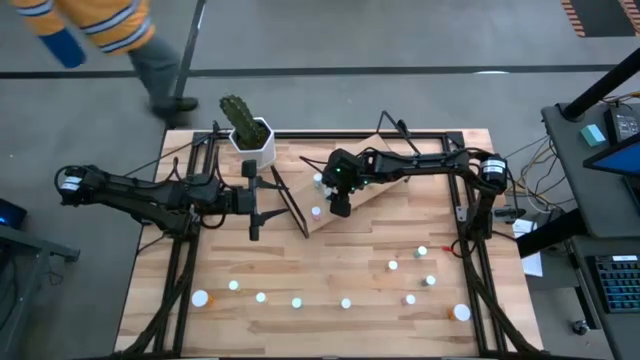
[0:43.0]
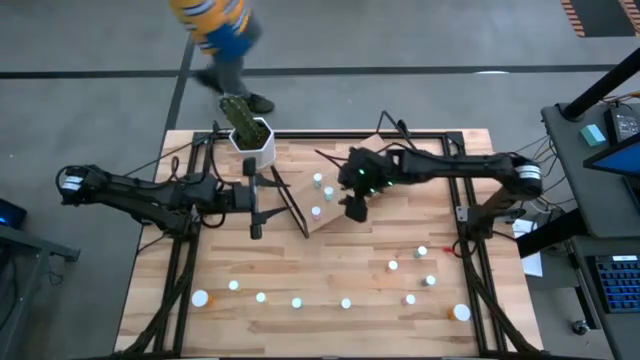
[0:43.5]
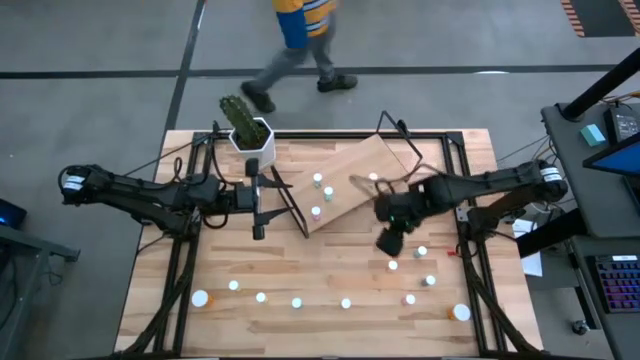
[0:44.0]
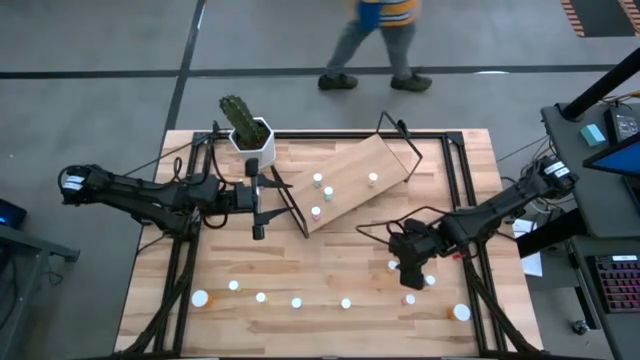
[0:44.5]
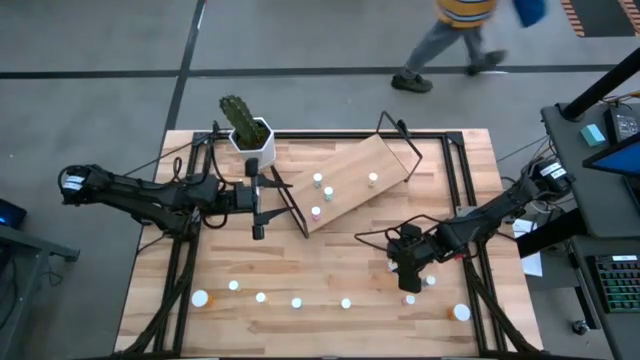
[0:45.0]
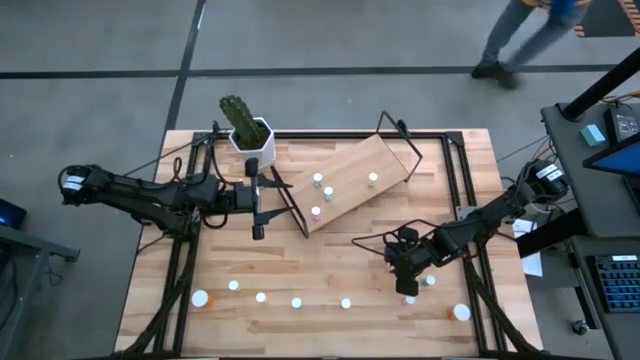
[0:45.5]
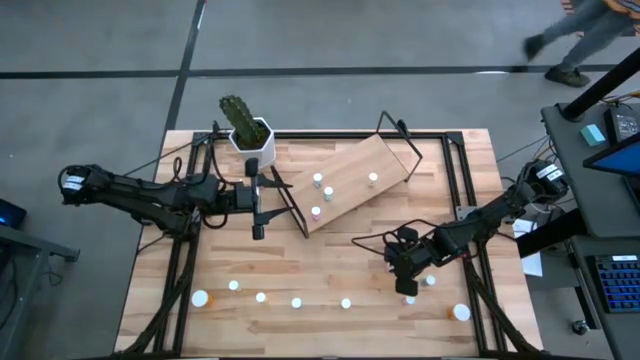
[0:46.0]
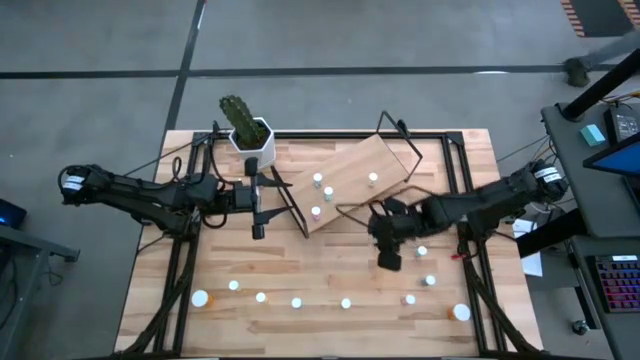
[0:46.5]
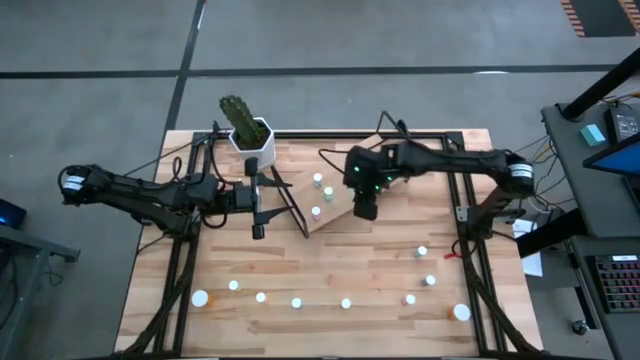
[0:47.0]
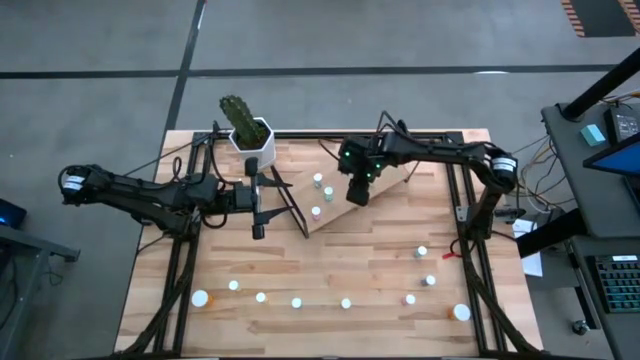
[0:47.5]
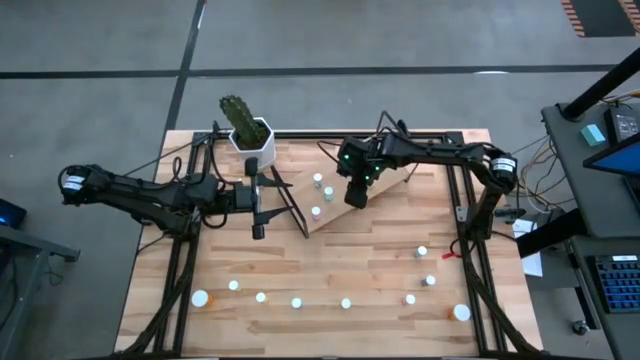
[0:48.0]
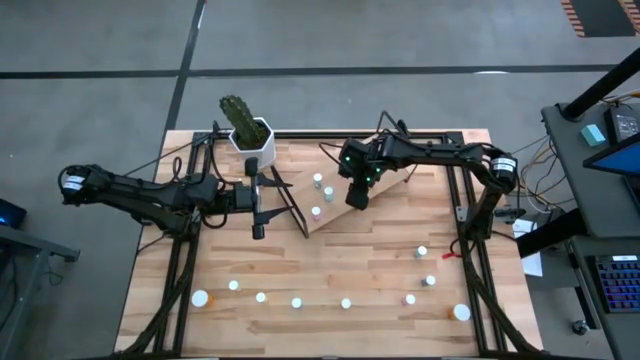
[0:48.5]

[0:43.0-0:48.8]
Task: Pick and place medicine bottles onto shelf by color
Put the yellow pill bottle on the shelf

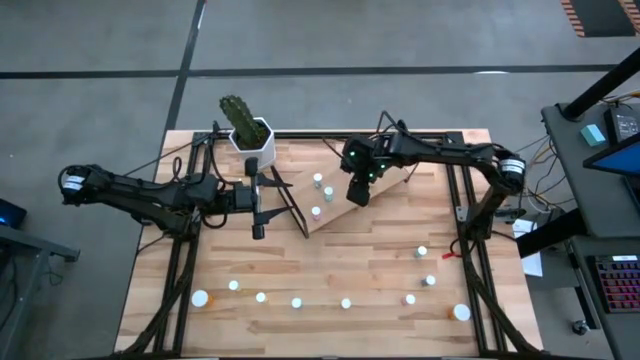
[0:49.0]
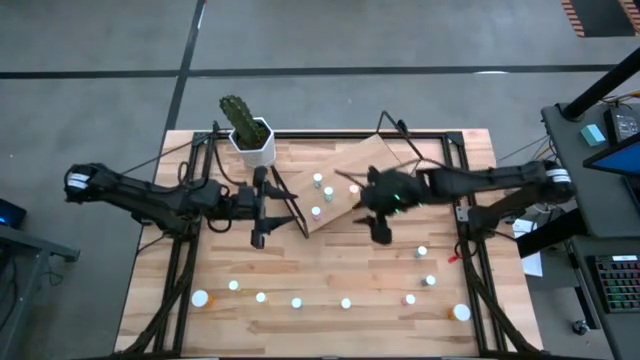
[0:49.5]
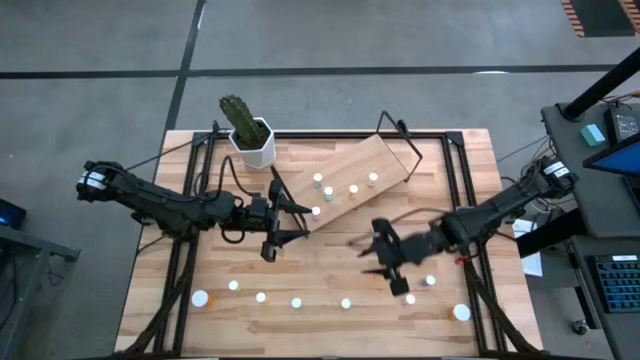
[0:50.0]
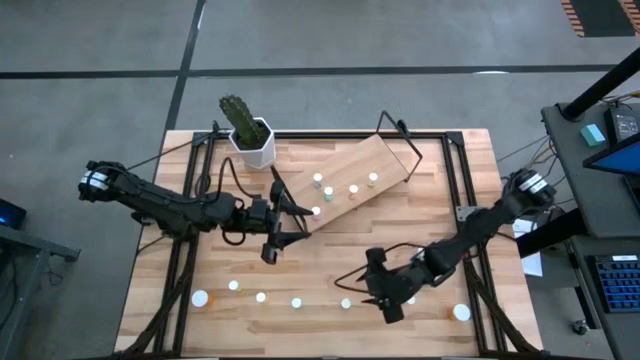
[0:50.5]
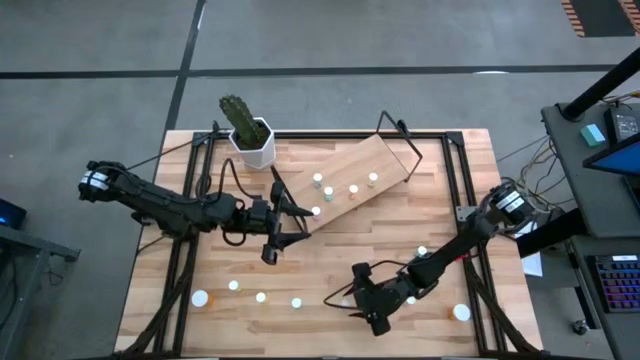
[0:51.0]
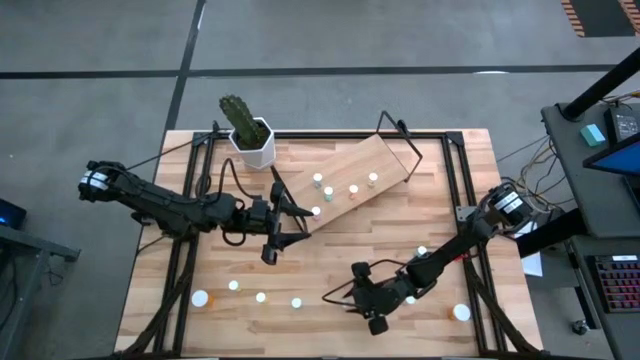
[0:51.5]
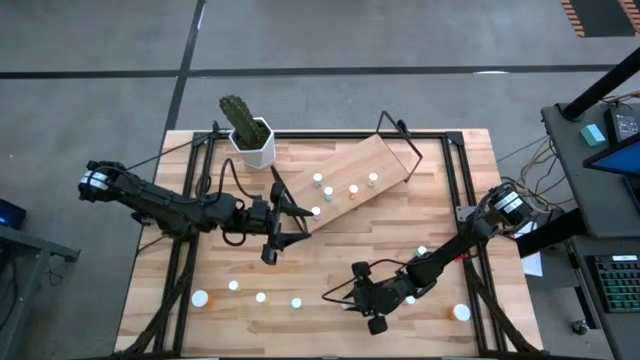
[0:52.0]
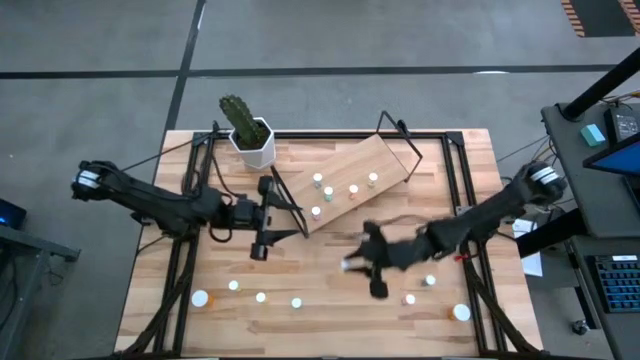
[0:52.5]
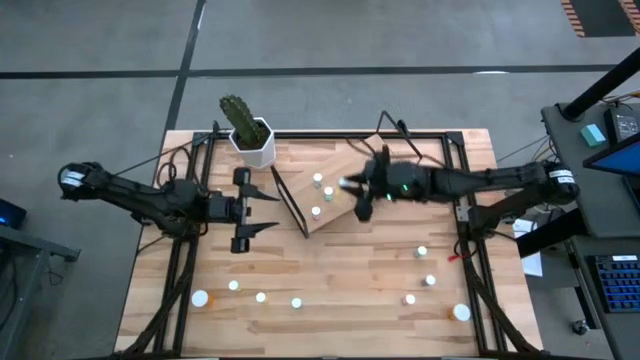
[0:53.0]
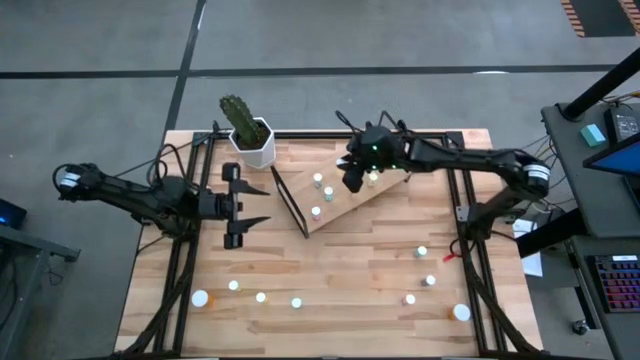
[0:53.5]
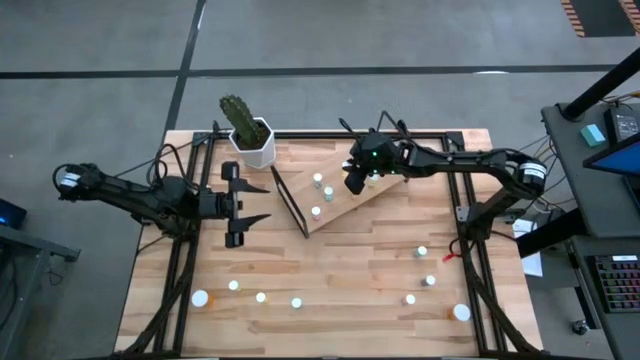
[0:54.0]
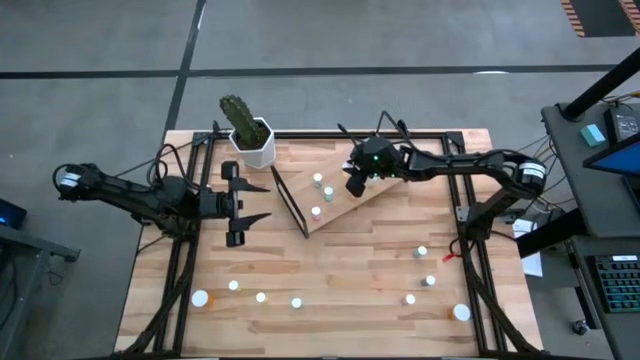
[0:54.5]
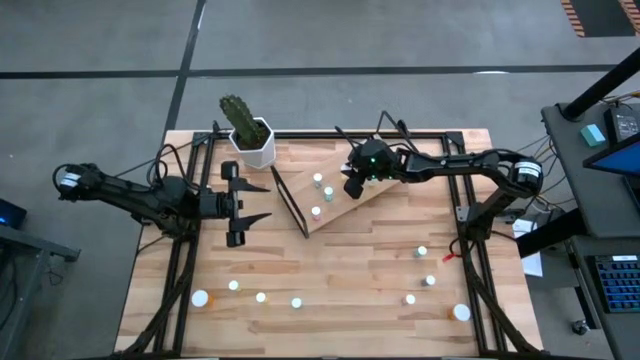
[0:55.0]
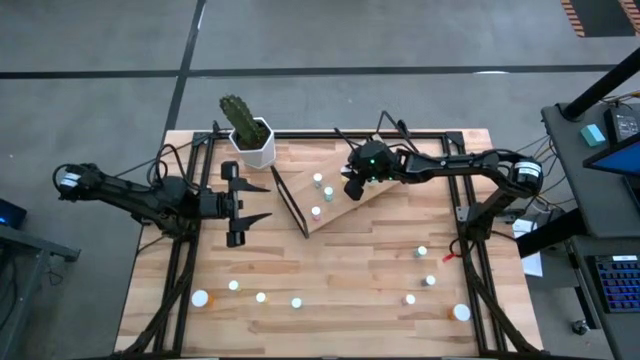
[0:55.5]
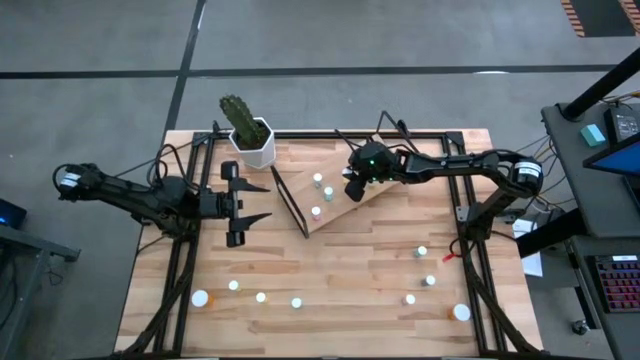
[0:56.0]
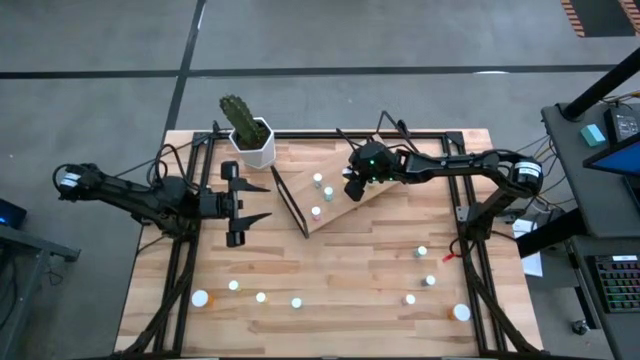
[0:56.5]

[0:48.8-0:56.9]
Put the yellow pill bottle on the shelf aligned with the other yellow pill bottle

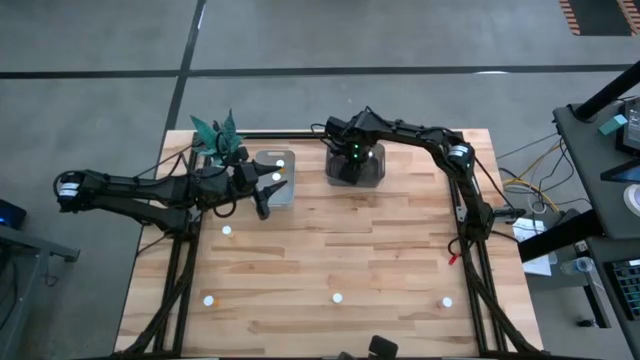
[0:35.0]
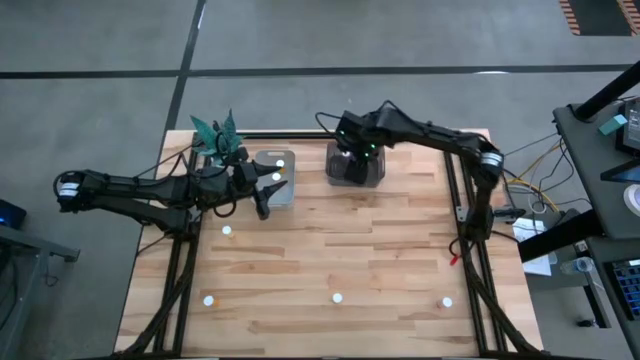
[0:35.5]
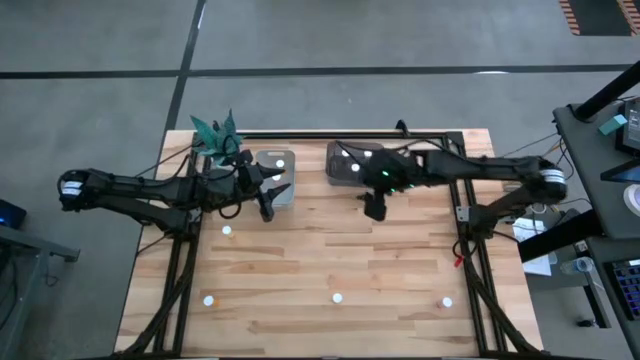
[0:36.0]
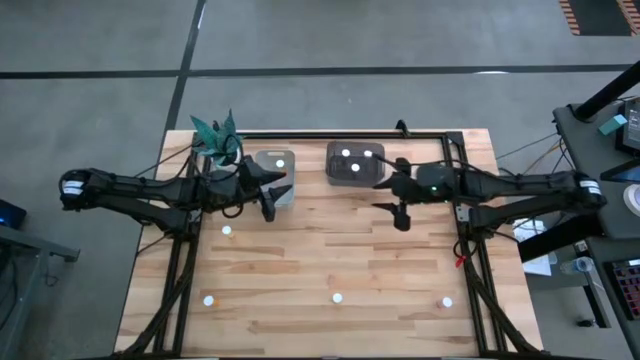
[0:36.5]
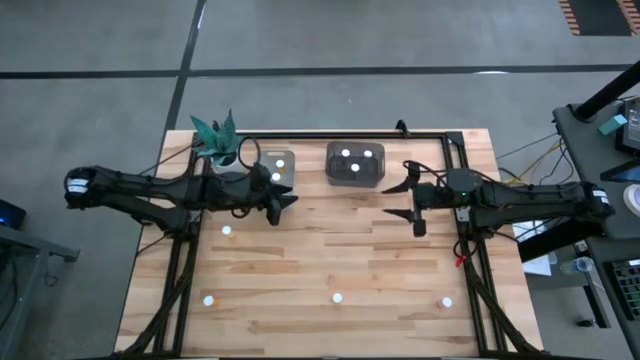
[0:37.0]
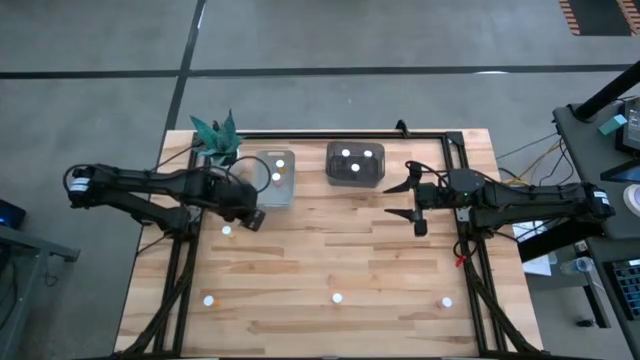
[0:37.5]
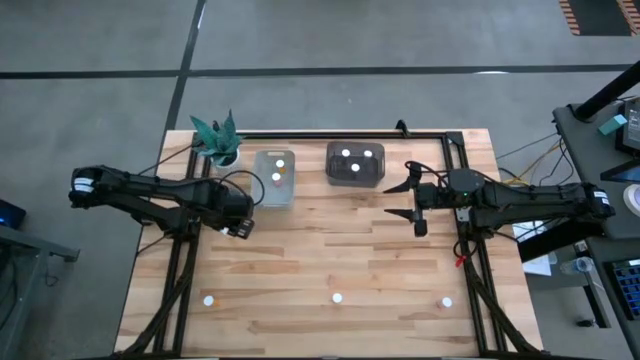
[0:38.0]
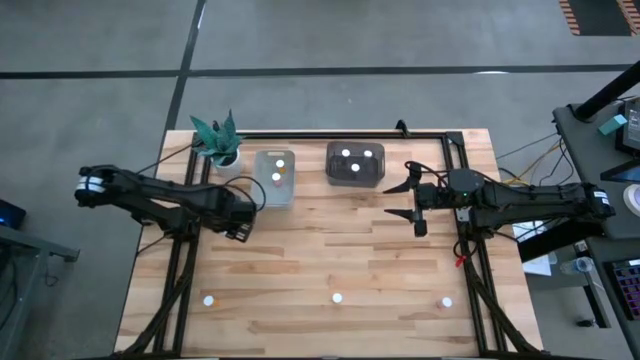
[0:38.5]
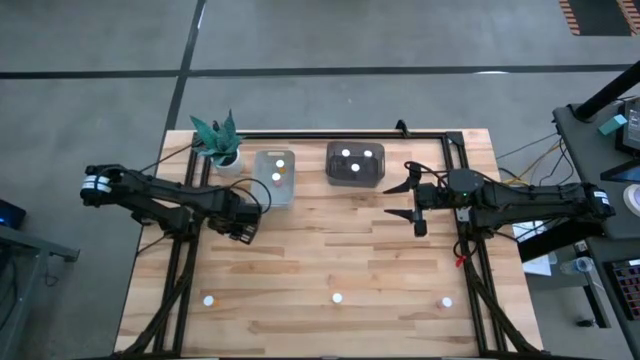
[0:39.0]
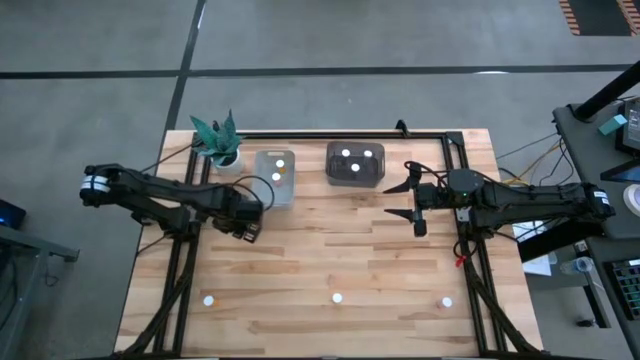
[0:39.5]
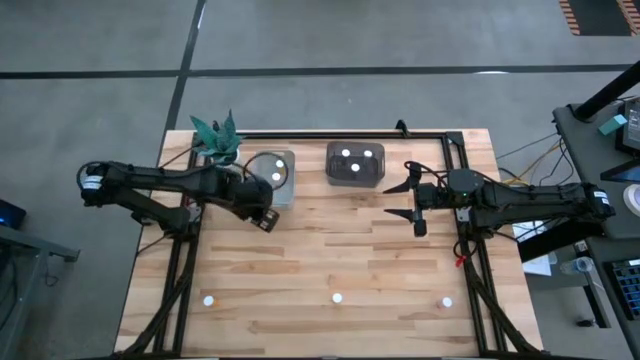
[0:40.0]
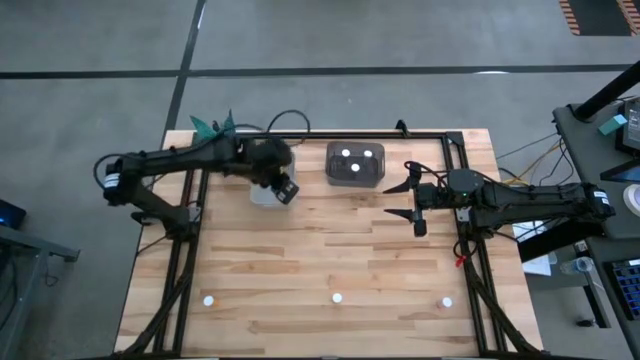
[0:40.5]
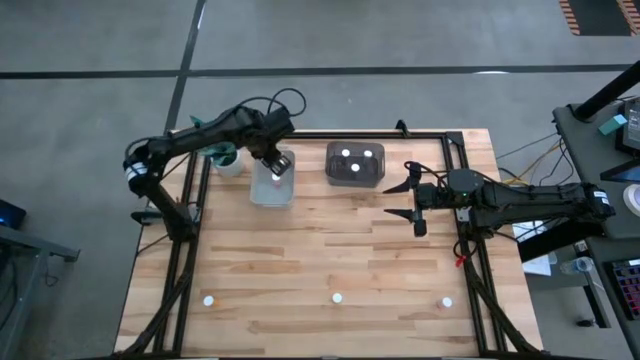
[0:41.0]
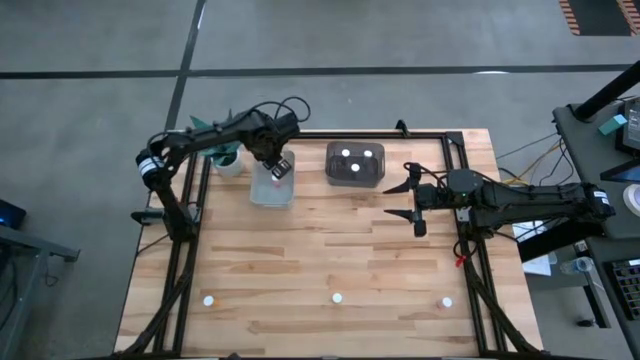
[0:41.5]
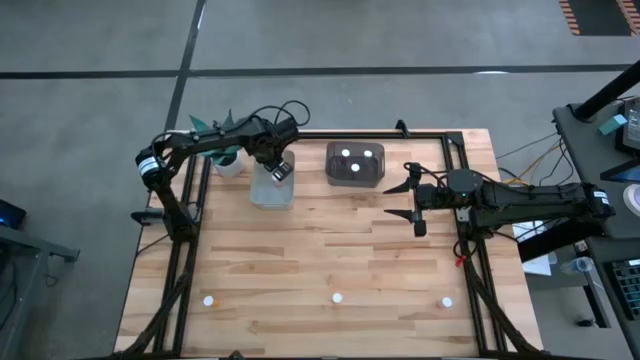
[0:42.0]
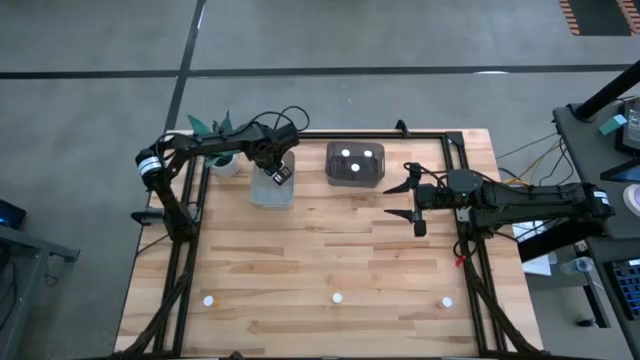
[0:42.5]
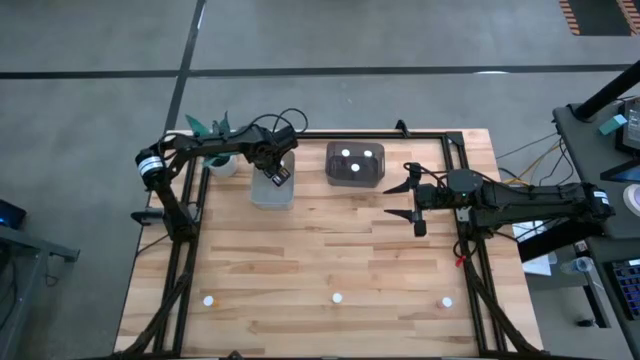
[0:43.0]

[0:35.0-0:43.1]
Task: Pick and place medicine bottles into bin by pill shape (circle, oval)
Put the yellow tablet bottle into the gray bin
